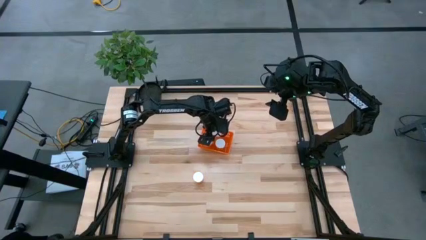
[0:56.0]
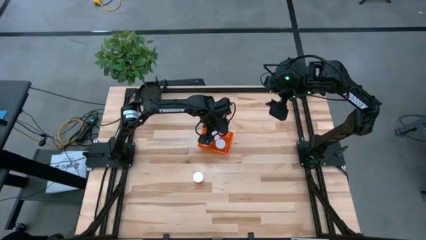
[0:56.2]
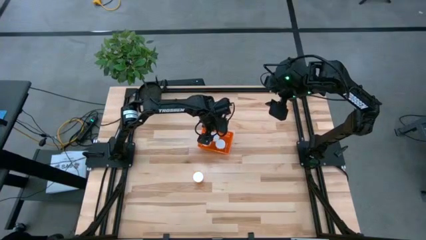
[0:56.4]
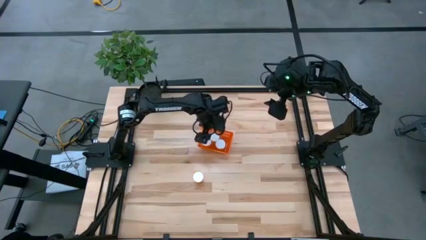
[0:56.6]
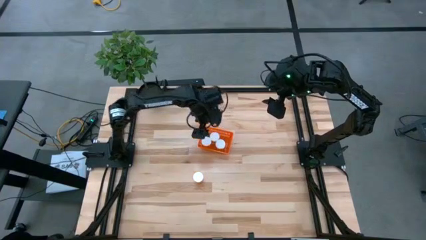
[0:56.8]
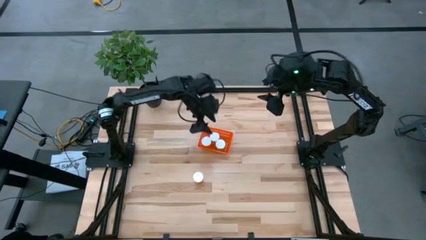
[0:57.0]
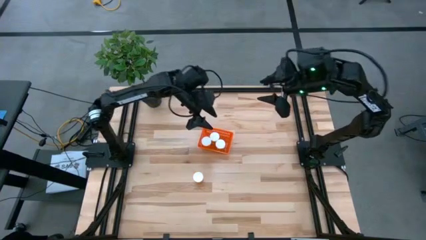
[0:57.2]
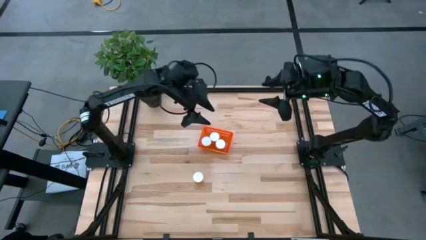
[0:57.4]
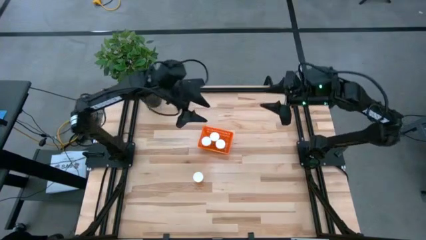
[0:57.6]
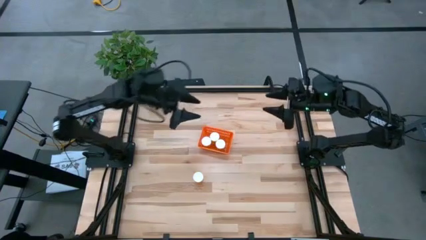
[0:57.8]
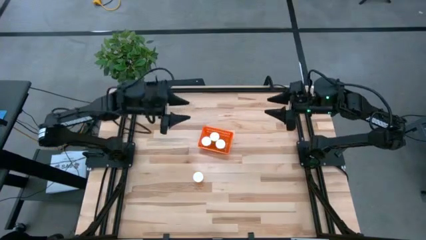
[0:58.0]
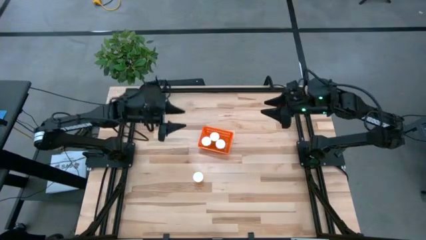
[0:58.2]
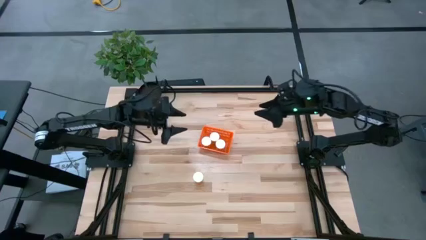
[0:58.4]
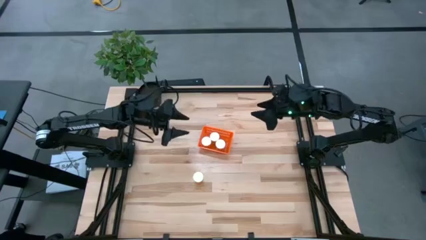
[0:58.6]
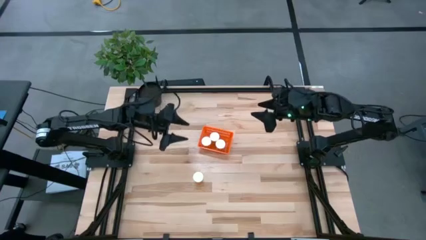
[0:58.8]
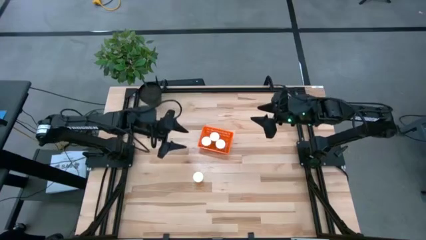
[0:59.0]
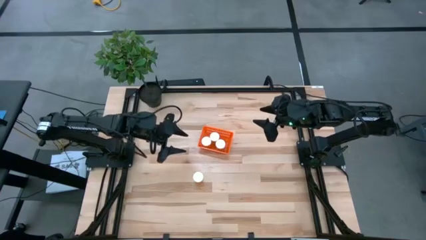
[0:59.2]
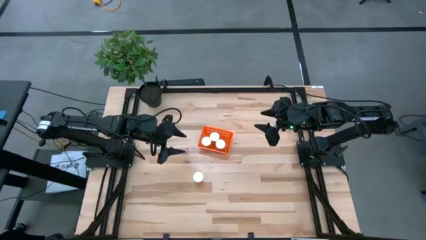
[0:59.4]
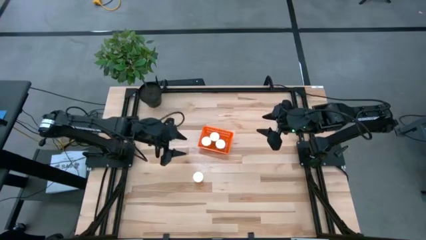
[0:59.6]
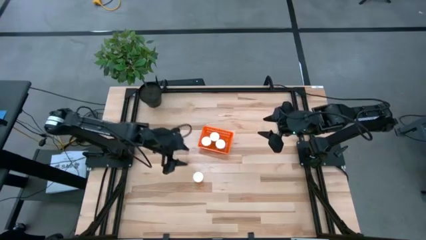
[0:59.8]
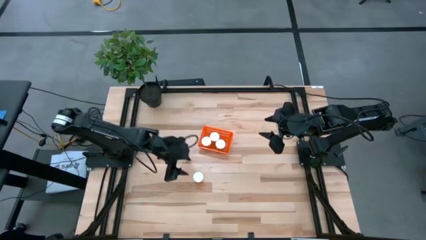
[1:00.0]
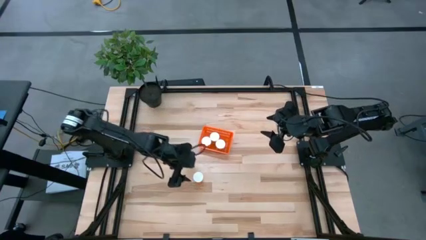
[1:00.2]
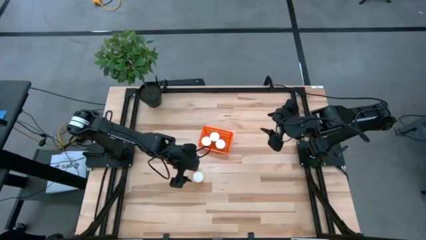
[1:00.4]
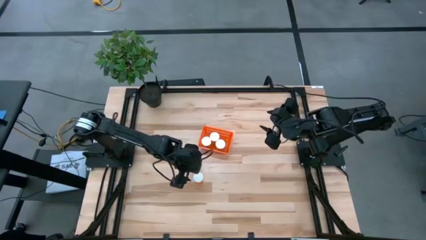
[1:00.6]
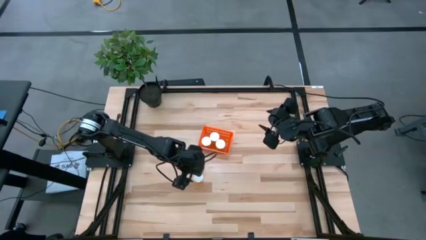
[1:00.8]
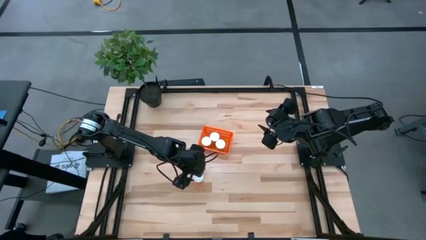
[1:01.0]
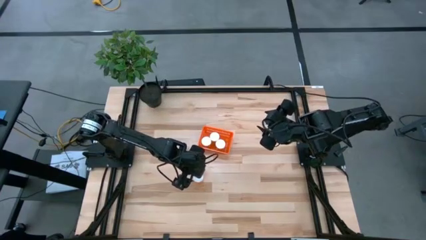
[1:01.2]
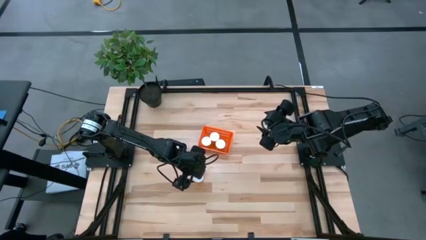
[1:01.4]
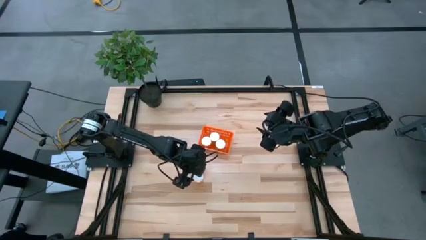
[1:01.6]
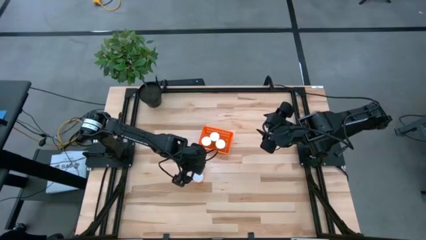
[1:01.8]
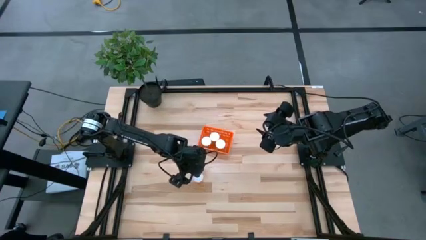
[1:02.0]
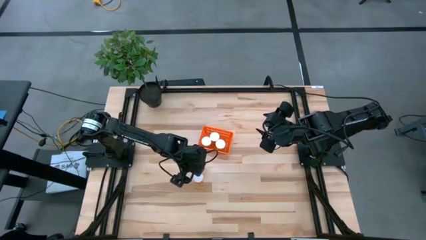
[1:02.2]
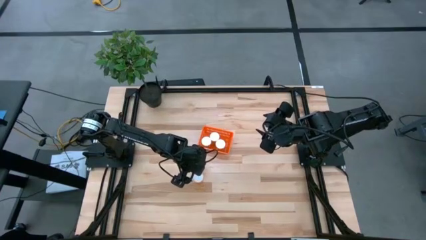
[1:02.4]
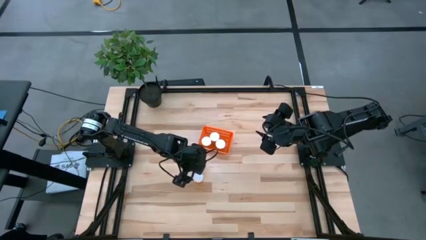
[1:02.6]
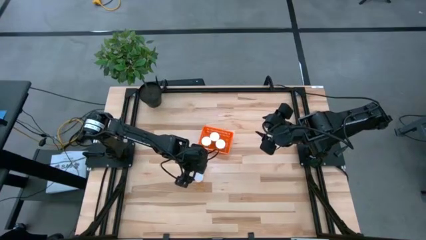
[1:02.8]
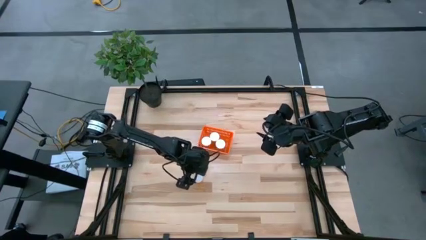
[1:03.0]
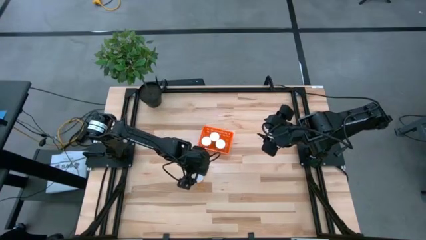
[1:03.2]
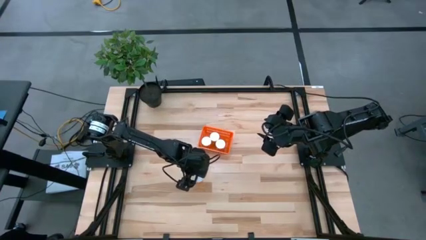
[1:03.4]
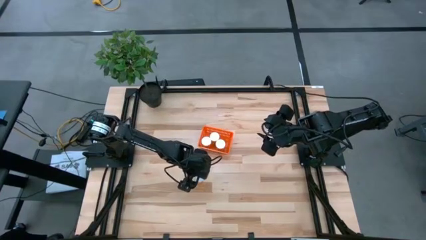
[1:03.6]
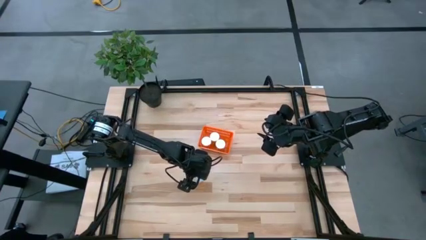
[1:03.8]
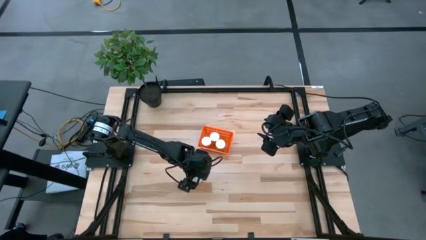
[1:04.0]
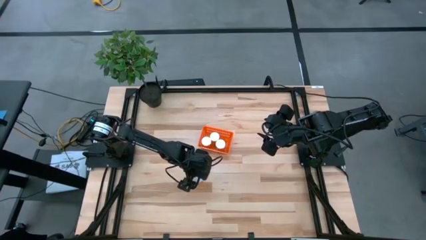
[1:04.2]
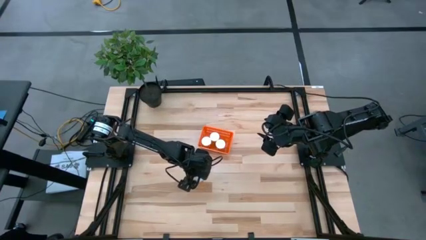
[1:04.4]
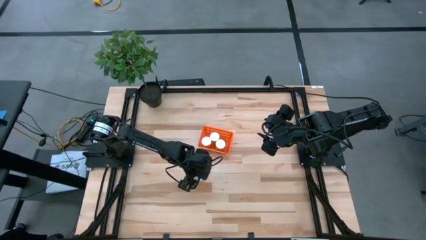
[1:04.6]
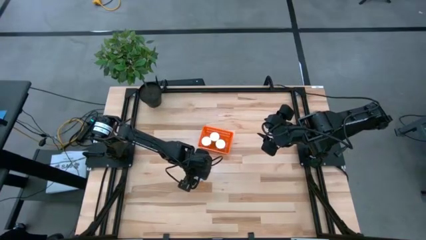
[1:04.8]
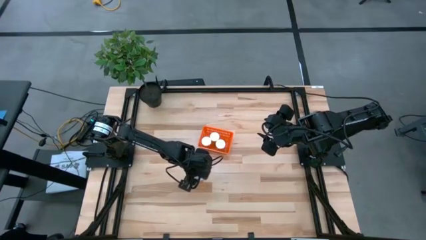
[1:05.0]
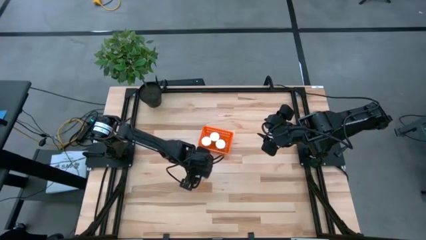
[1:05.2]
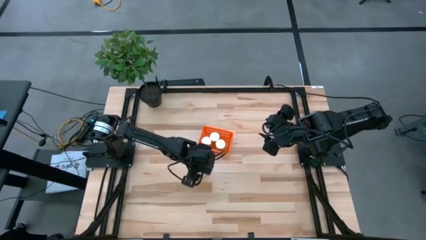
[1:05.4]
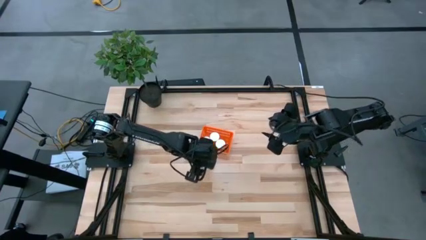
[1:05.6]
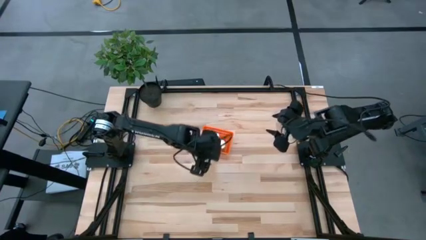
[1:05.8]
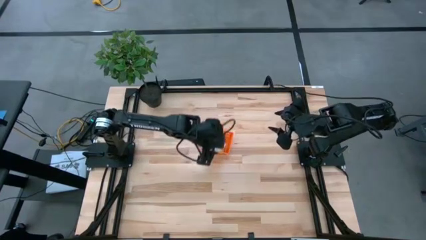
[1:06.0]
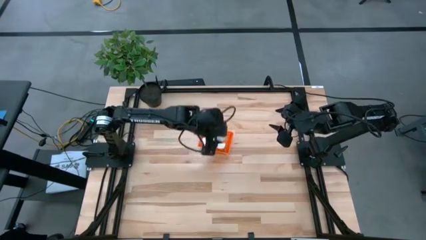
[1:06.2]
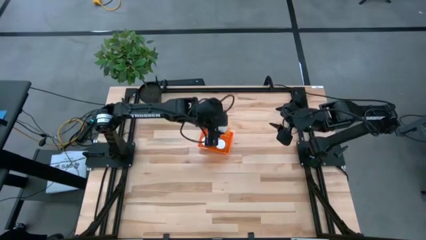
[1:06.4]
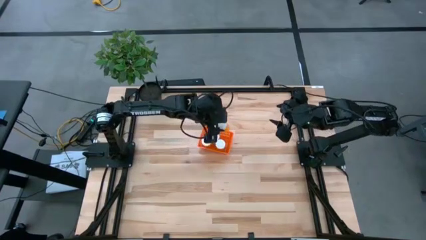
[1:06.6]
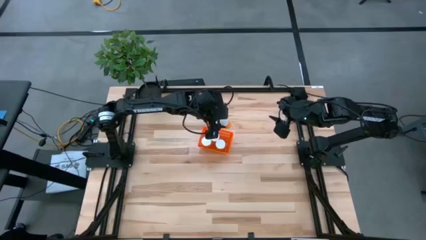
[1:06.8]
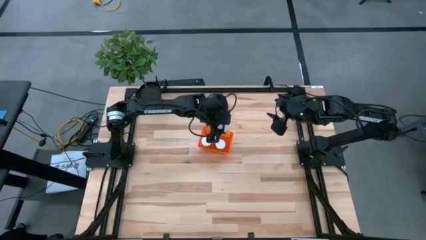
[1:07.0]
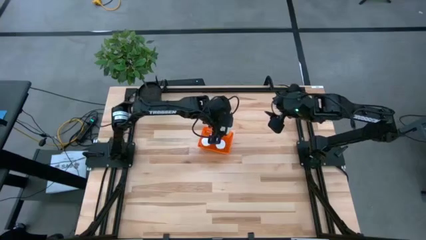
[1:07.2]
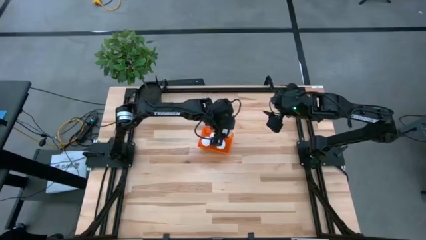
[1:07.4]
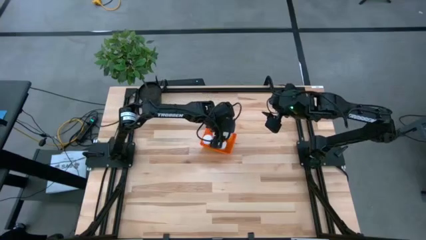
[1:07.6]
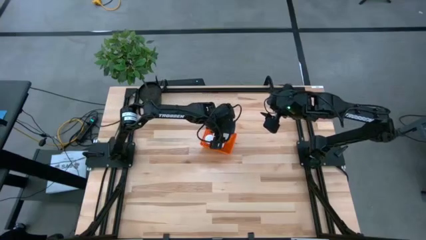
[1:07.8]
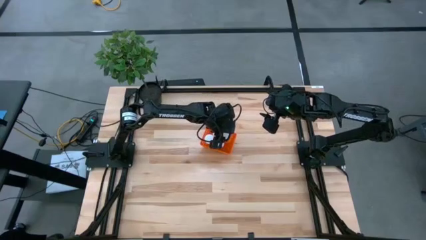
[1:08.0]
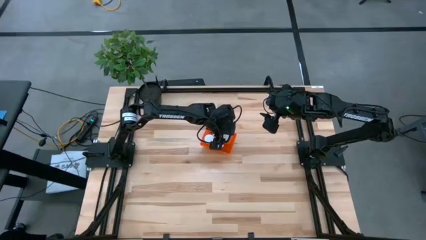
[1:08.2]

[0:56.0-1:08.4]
Task: Pick and place pill bottles into a basket
Put the orange pill bottle into the orange basket

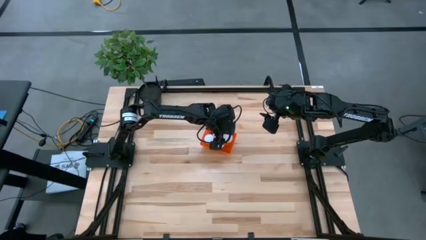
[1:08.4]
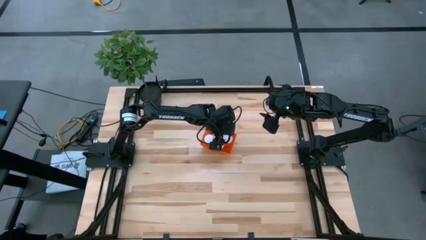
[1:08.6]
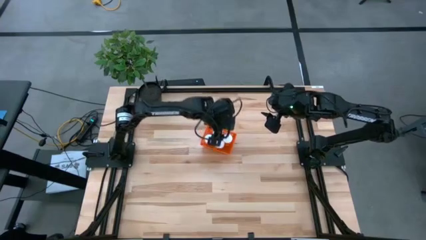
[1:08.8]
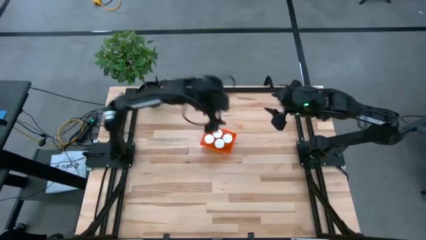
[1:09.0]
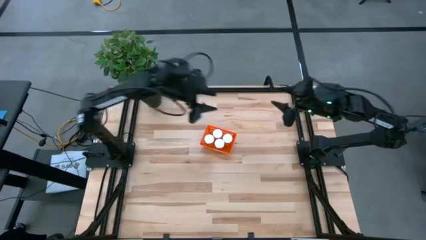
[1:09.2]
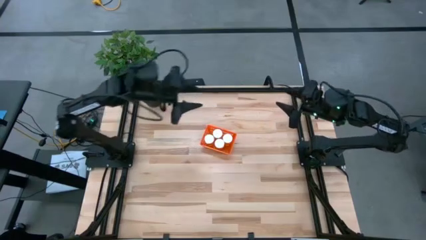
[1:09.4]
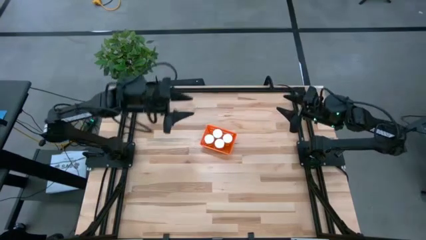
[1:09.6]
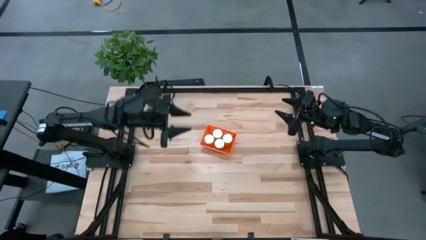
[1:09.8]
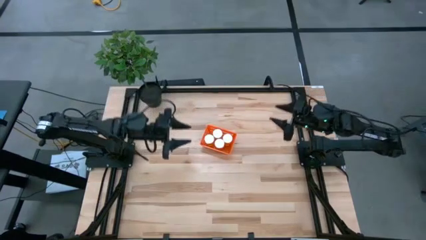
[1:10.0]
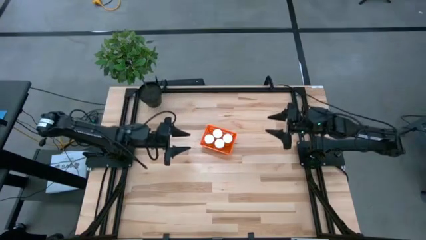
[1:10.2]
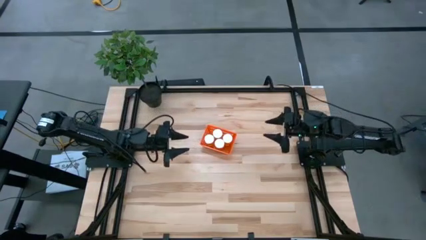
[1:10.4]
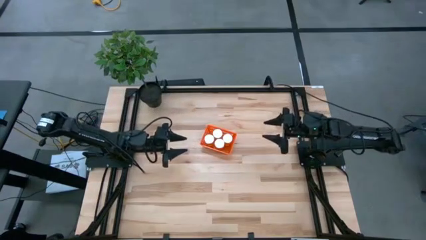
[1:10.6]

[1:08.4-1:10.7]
Return to Home Position

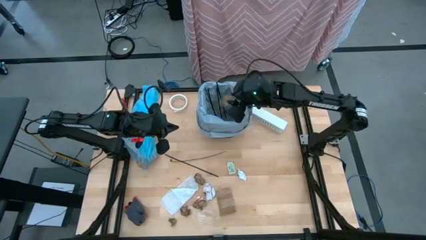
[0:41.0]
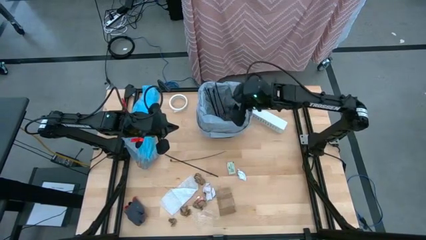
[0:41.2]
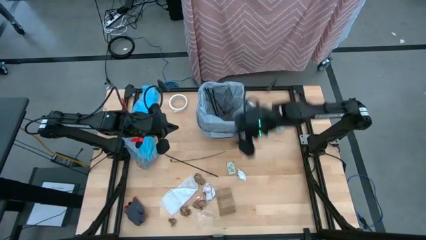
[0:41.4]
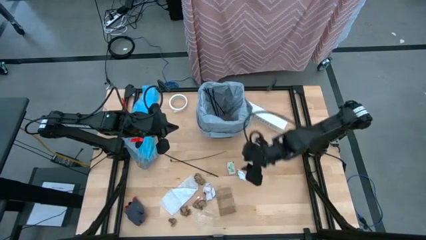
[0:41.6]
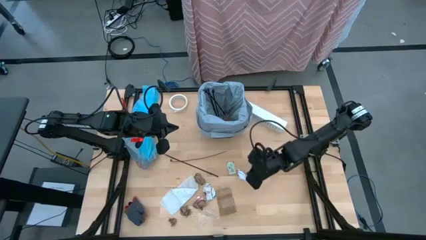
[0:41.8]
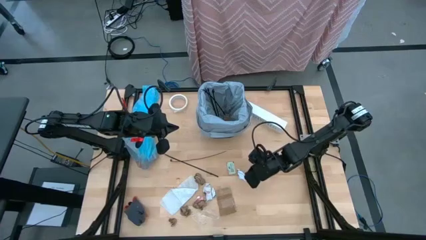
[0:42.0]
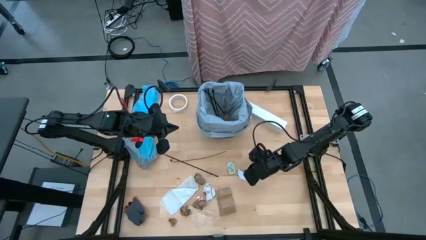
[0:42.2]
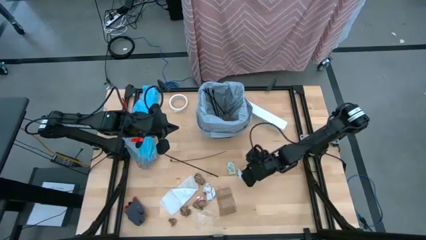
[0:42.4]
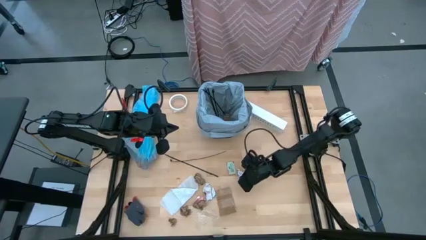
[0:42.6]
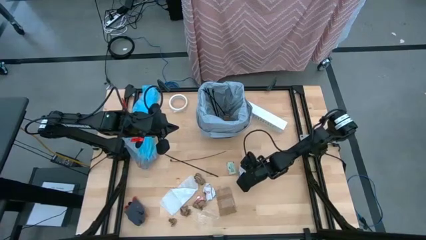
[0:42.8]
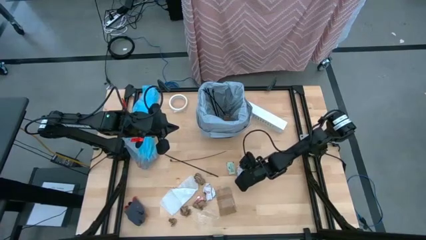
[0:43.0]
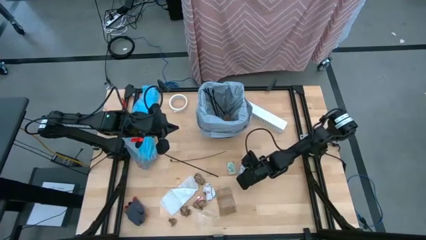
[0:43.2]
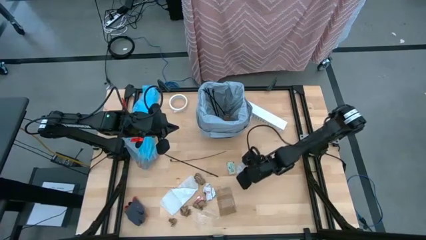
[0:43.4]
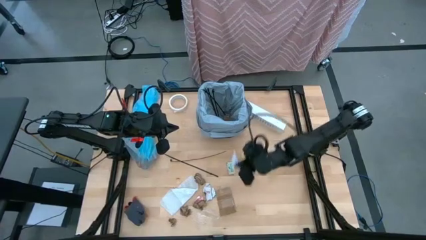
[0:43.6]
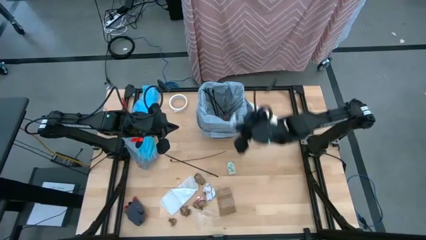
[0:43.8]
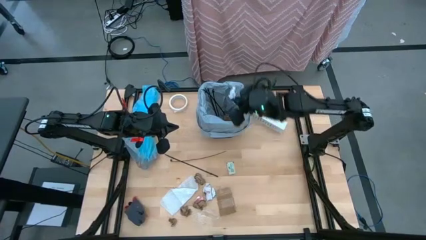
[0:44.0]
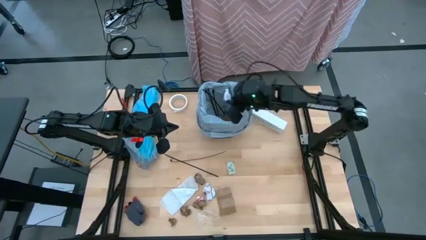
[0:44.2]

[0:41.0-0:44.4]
Task: place trash/remove bag and relplace
Put the white paper into the trash bin
